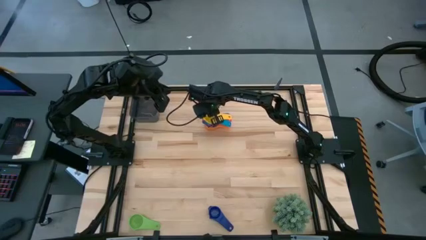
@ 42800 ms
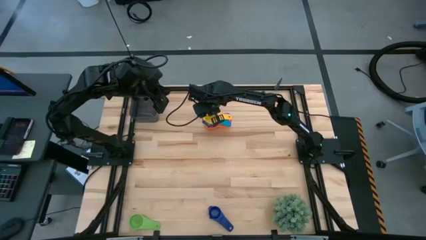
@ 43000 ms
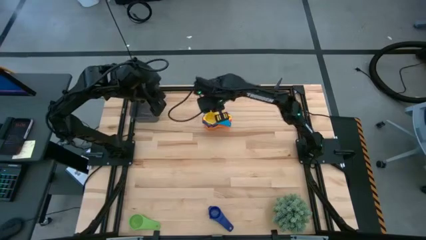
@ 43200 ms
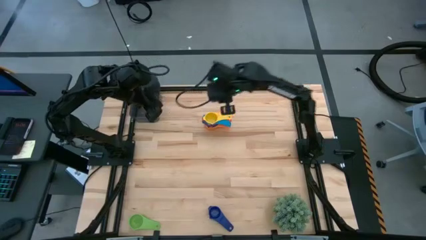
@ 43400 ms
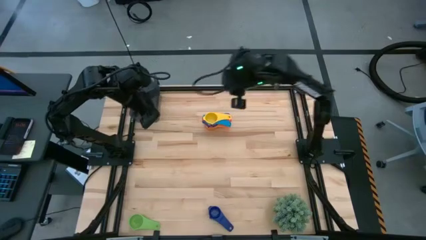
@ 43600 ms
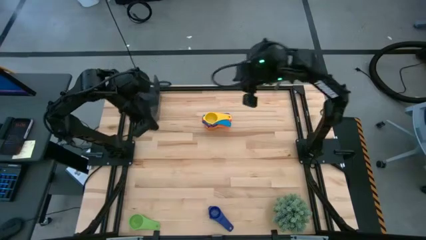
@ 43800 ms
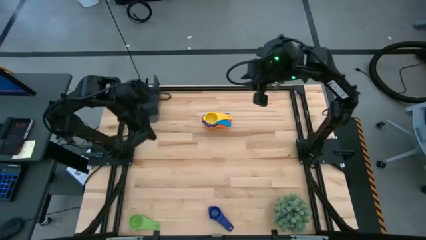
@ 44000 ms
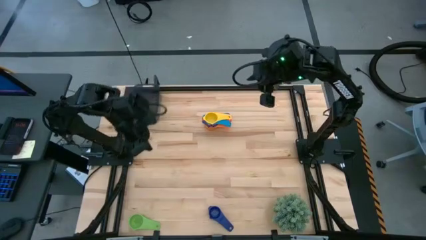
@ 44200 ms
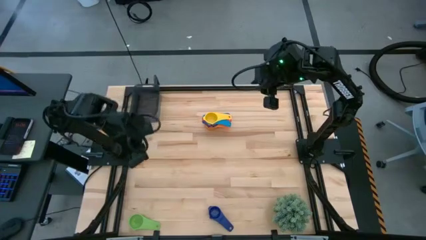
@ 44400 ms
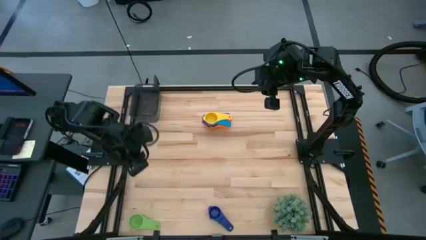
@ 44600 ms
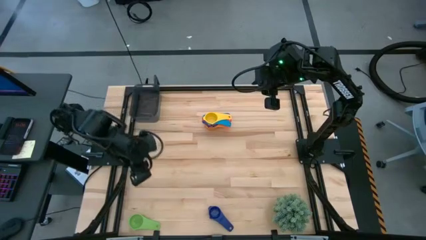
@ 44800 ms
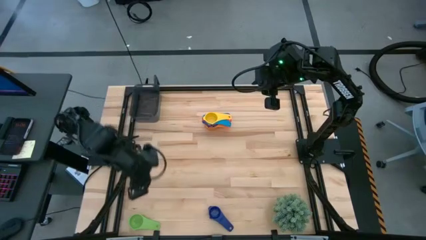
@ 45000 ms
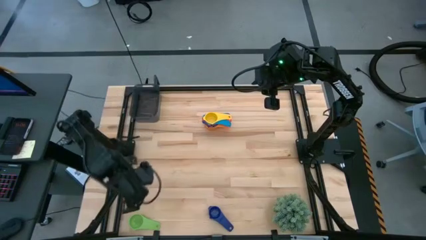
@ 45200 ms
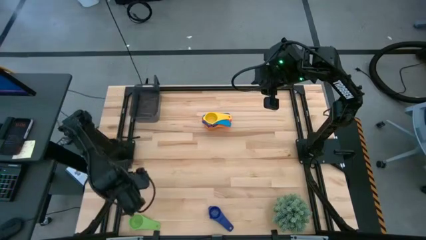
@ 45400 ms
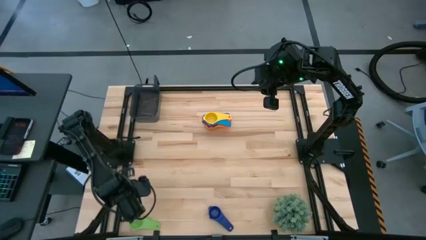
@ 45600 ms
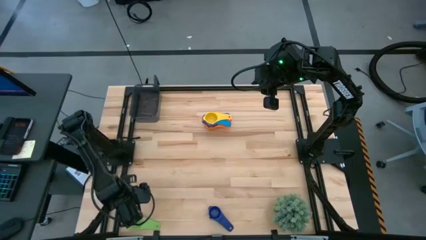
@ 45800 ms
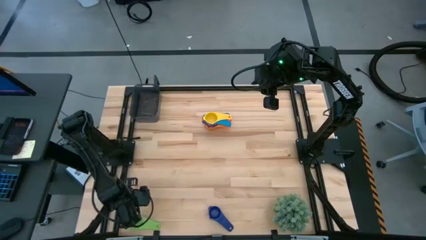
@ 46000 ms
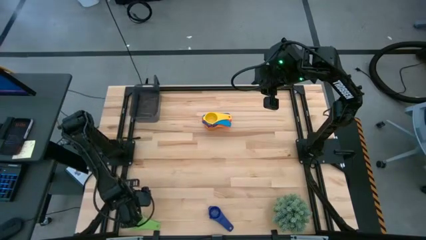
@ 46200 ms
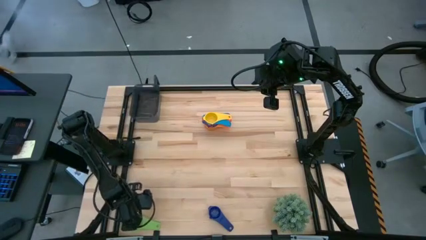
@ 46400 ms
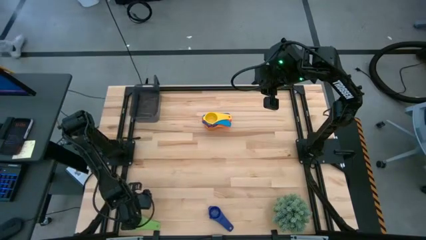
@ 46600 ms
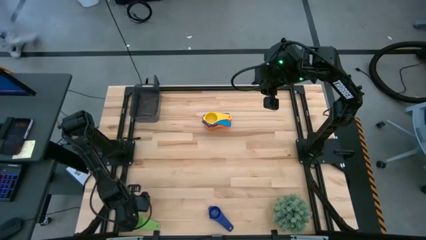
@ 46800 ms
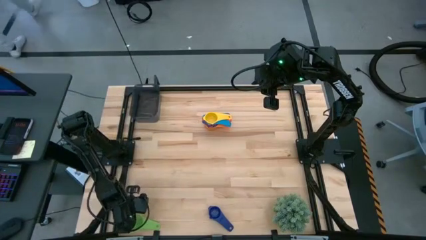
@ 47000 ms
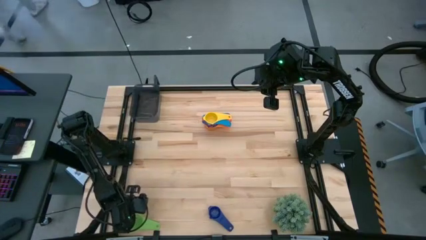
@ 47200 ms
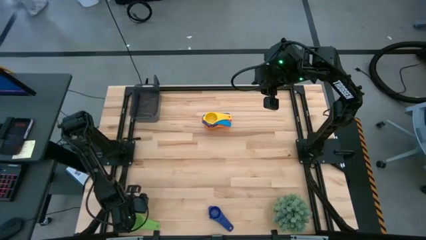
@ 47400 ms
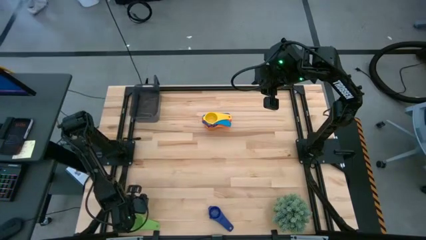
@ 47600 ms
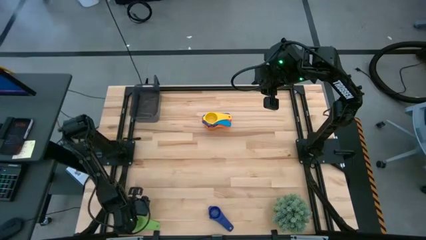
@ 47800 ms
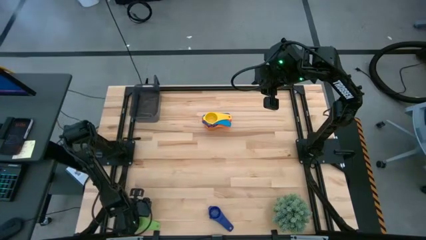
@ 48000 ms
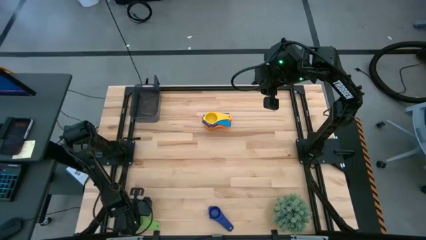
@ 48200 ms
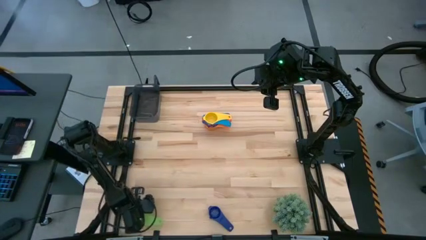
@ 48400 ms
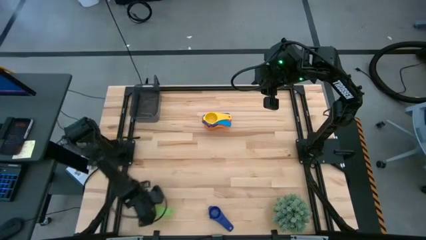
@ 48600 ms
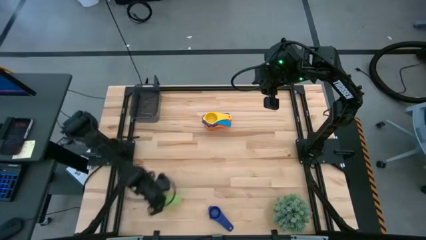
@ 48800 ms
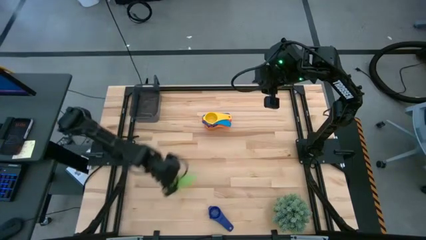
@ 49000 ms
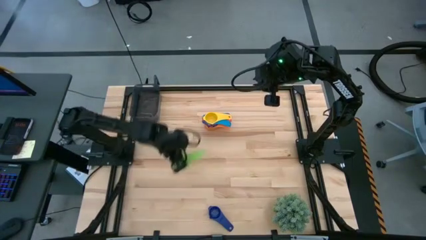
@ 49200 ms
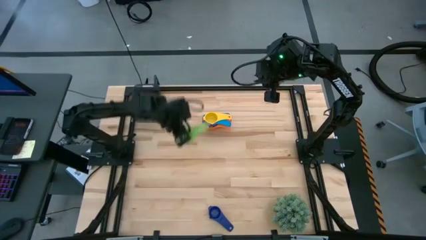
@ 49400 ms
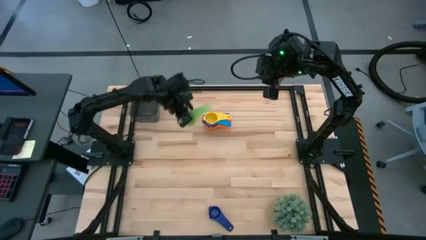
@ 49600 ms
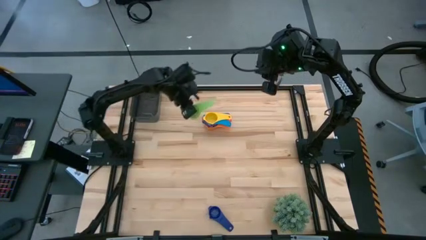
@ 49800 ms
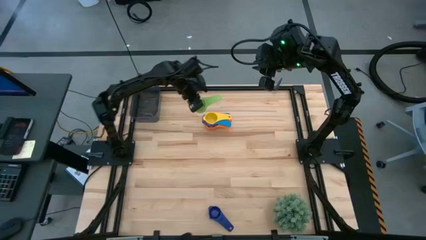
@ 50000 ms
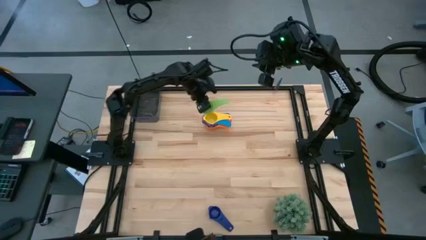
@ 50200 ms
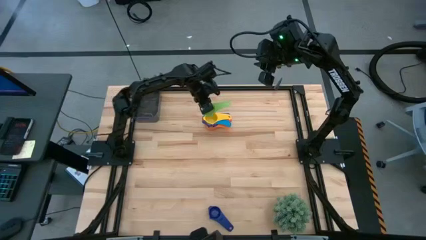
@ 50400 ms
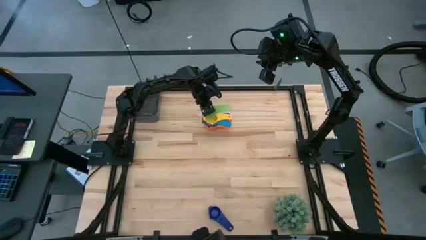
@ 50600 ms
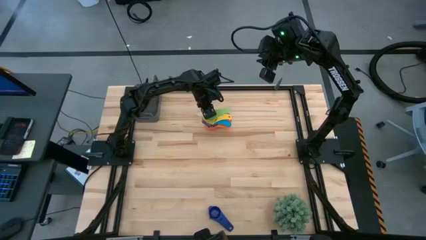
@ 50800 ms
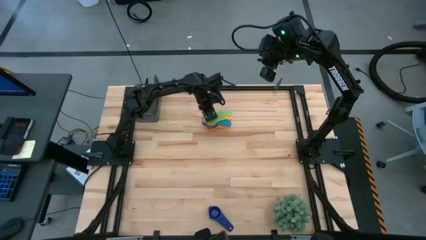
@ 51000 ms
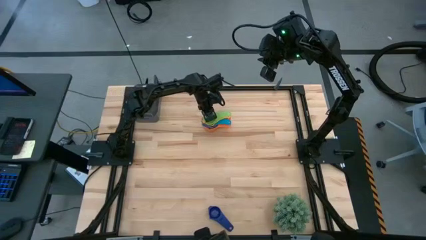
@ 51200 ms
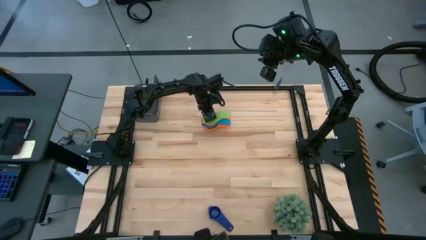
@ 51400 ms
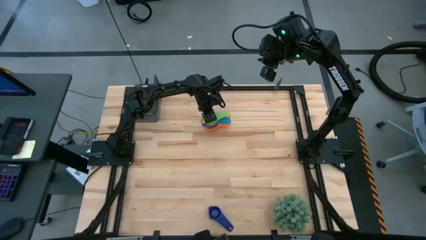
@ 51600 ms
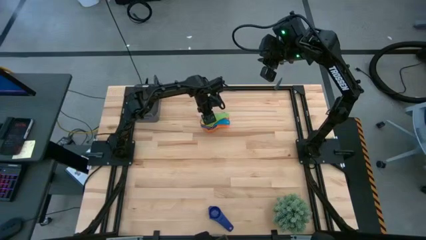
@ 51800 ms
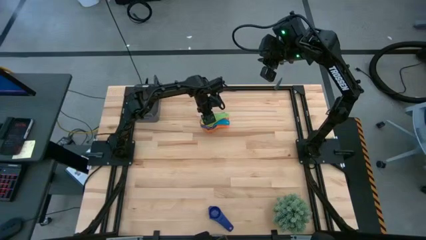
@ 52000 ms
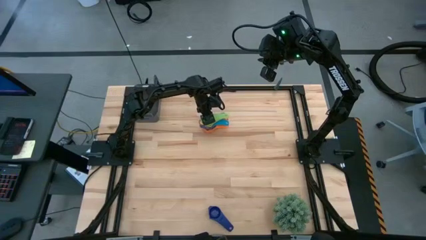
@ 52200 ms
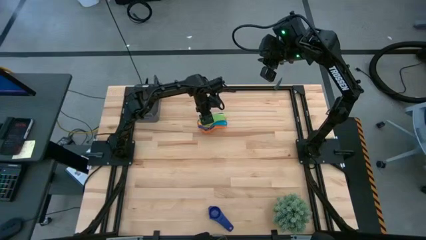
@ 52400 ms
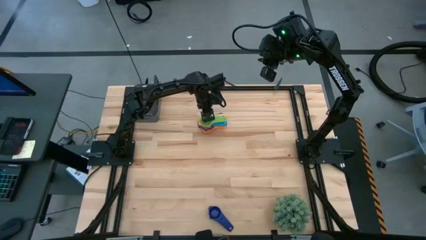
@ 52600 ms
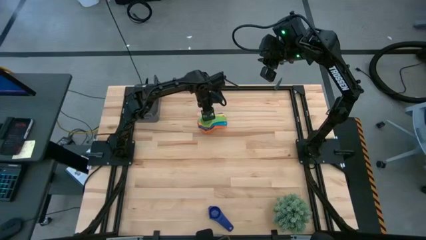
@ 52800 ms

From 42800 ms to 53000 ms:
Task: Nest measuring cups in basket
Stack the green measuring cup on top of the yellow measuring cup

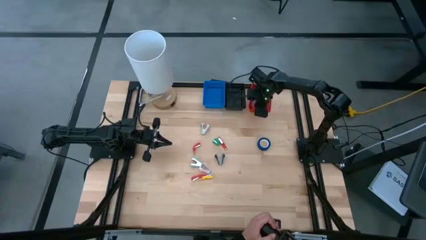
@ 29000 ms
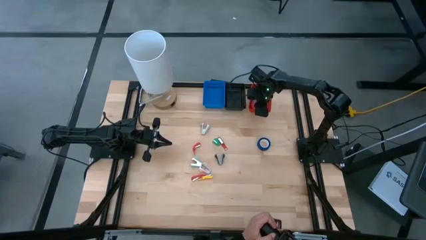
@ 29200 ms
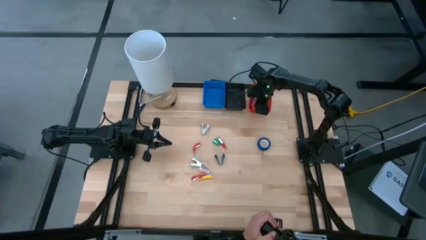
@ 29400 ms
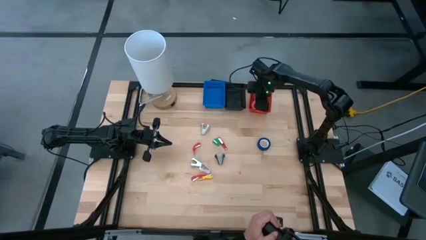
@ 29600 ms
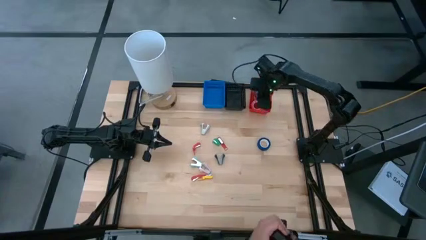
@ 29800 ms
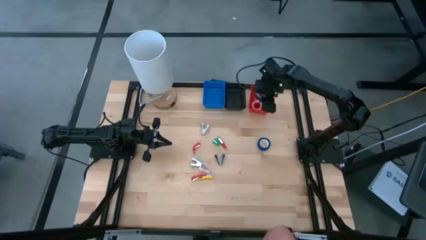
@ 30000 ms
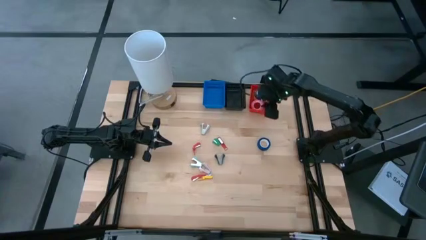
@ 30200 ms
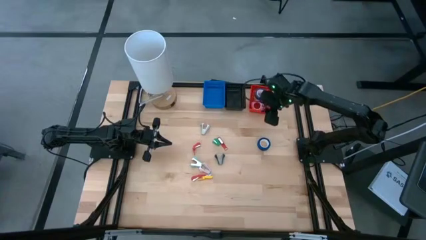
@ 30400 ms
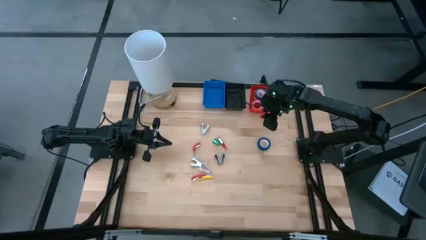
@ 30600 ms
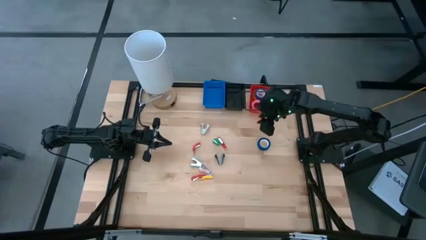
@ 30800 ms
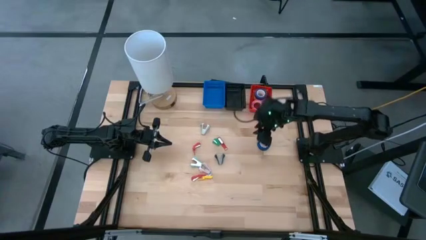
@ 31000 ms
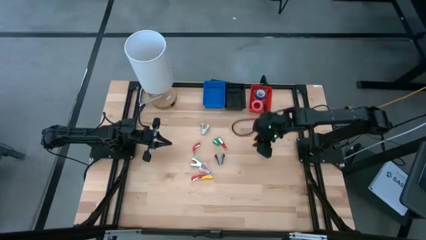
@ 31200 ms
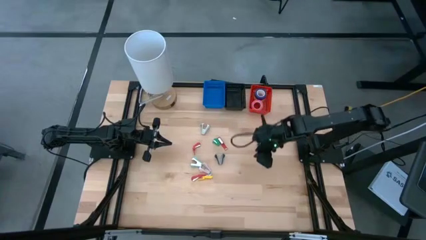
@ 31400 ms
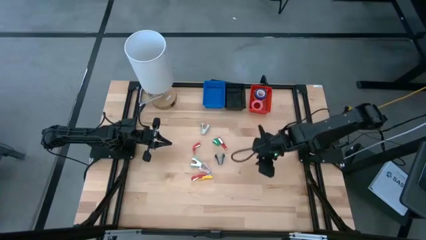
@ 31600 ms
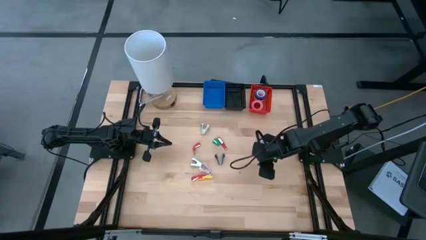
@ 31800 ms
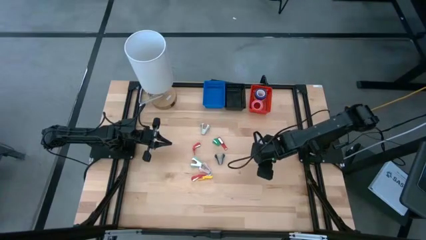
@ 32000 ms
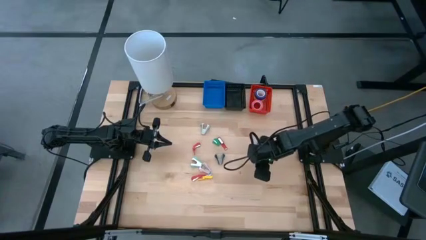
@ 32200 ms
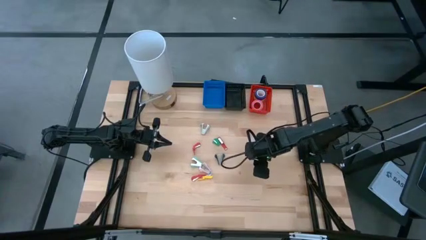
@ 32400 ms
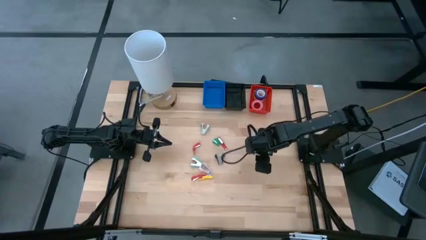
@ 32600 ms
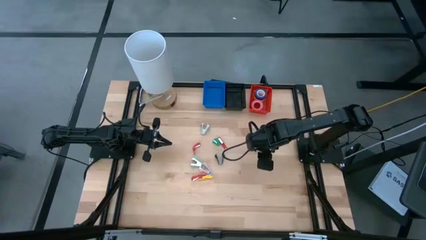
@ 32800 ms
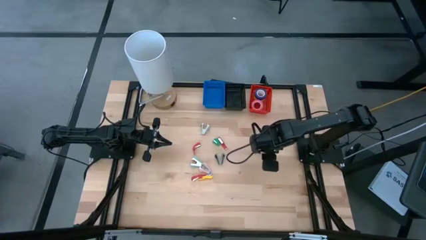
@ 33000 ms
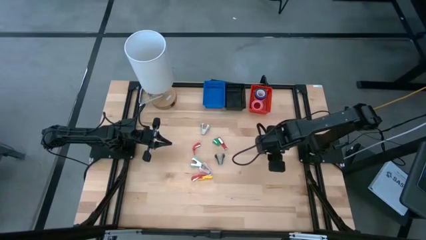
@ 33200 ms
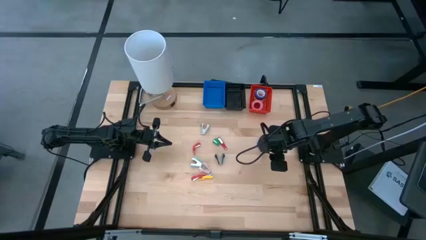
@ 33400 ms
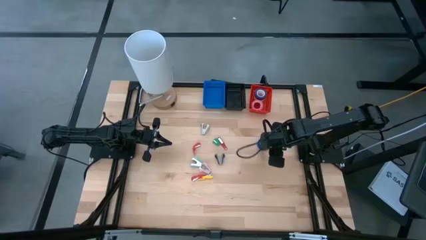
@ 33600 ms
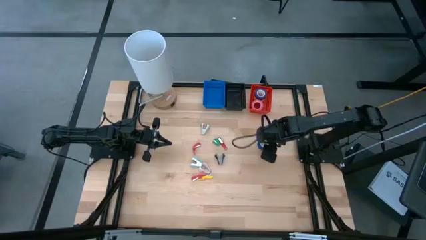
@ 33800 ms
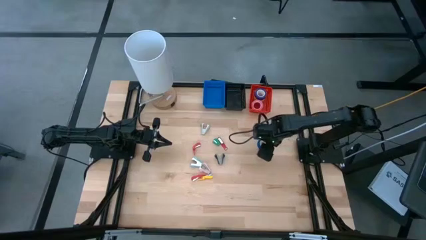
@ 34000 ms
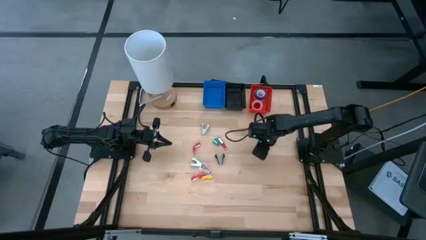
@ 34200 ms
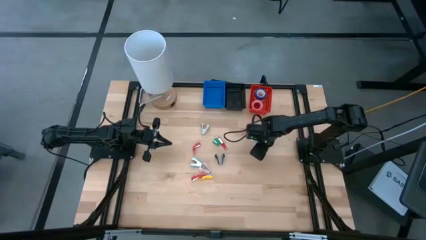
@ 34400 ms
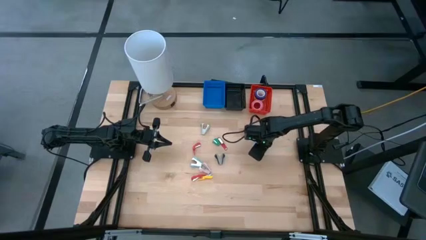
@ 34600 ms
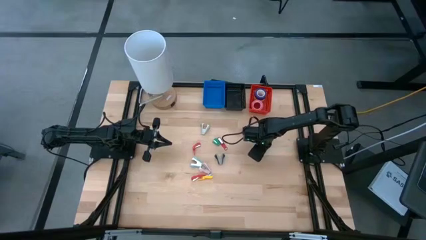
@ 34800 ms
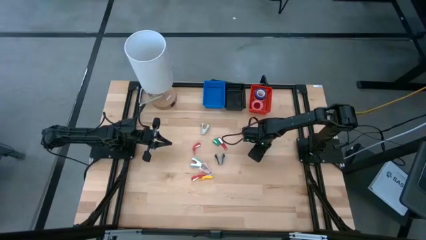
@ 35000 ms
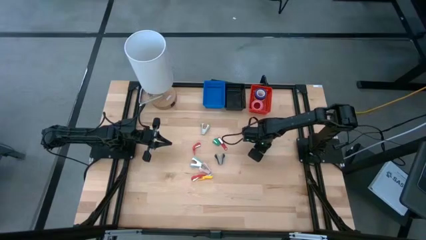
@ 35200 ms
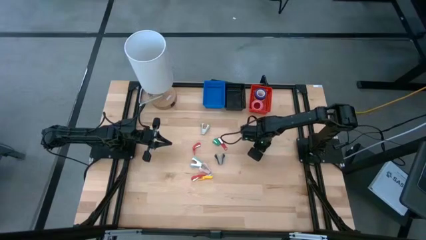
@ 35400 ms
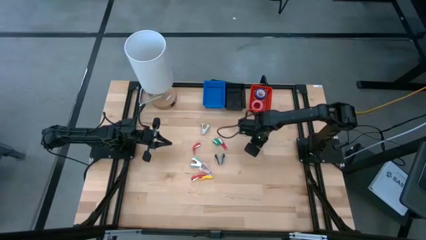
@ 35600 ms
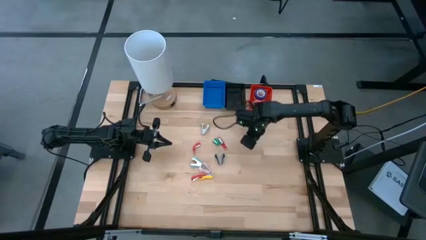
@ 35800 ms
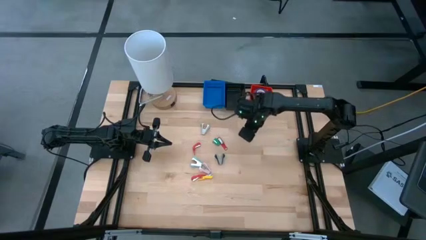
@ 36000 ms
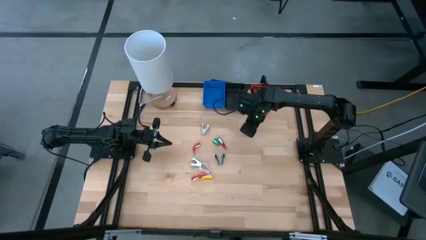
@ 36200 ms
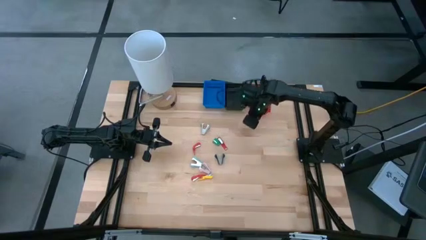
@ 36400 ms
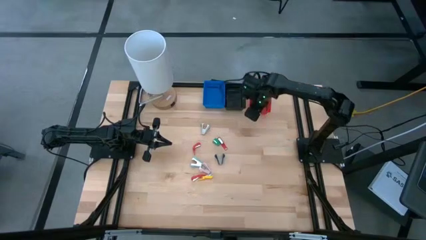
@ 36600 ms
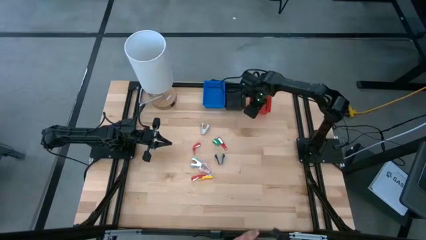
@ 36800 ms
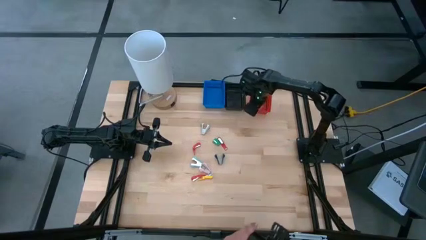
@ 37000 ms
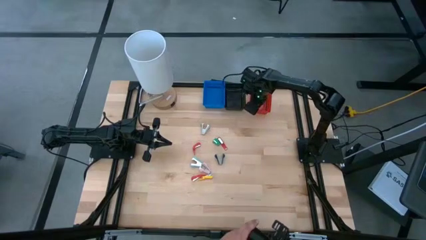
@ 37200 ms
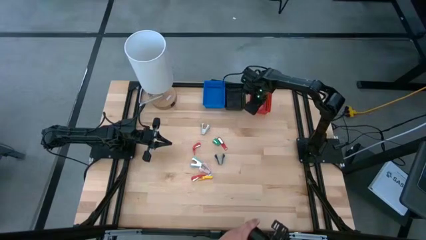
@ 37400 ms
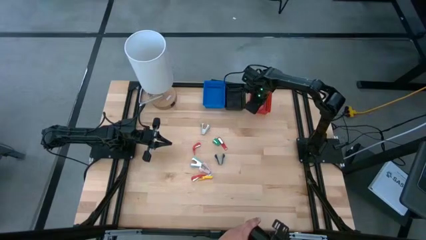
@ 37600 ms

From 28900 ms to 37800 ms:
Task: Pick and place Stapler, Stapler remover, tape
Put the blue tape into the red bin
